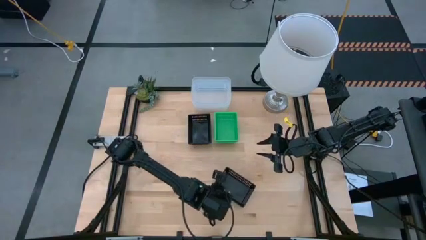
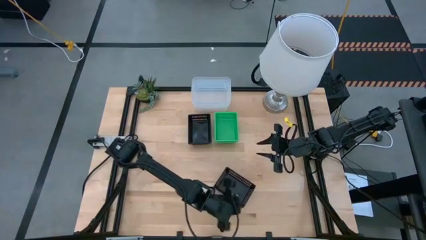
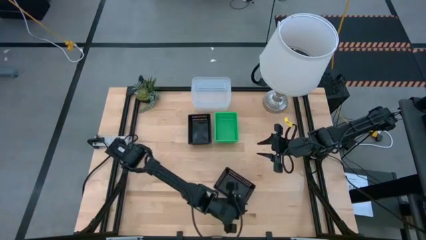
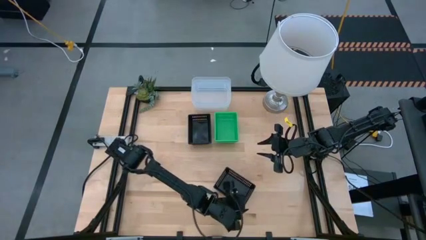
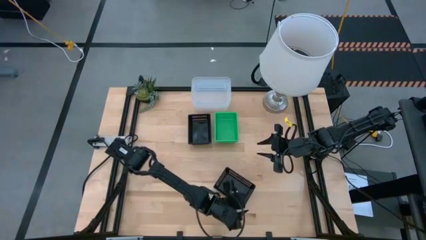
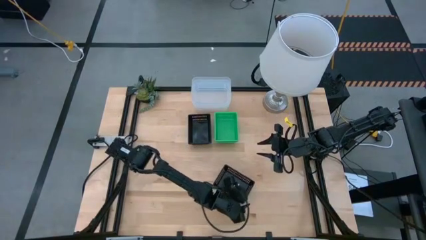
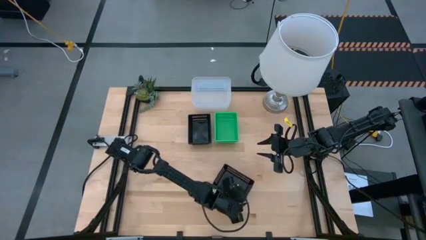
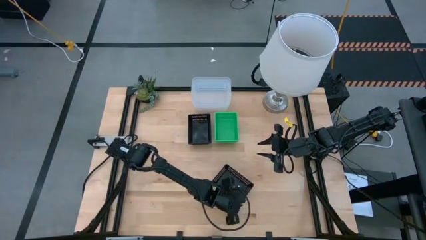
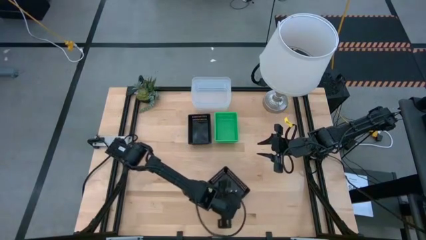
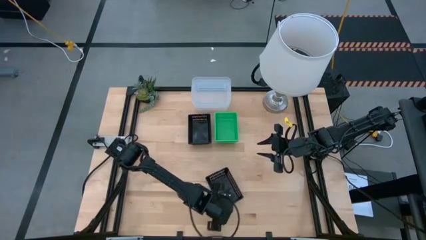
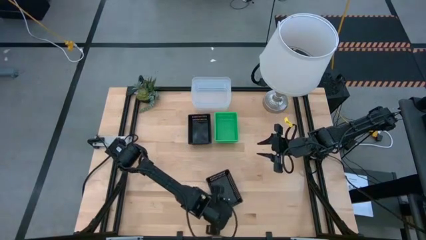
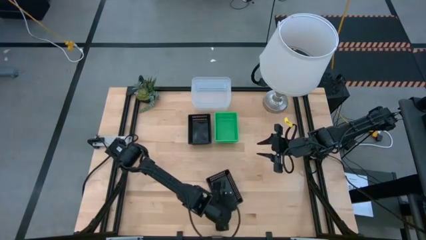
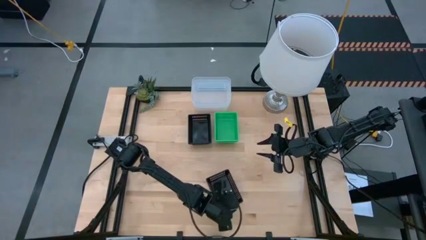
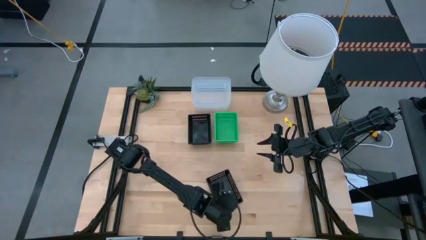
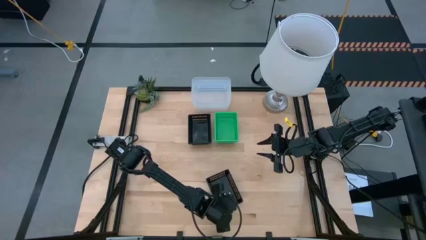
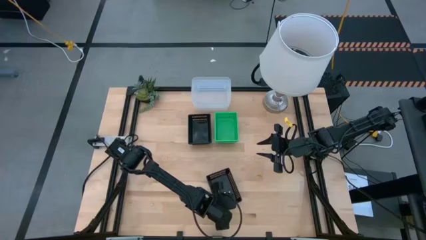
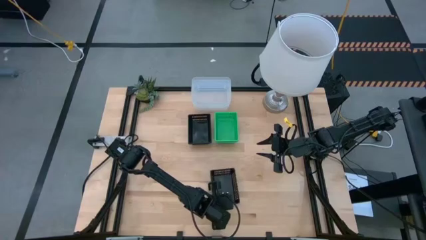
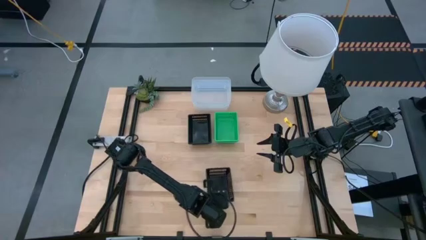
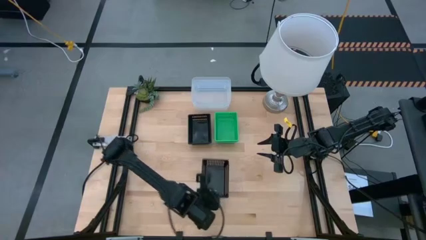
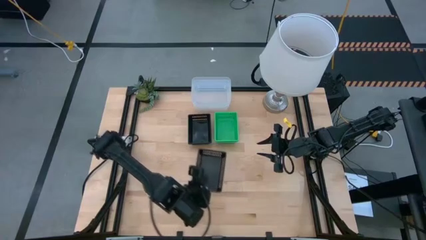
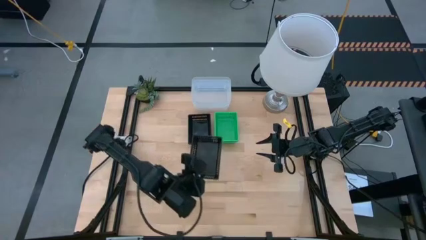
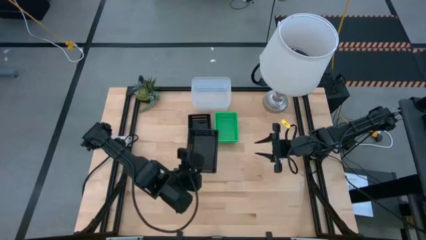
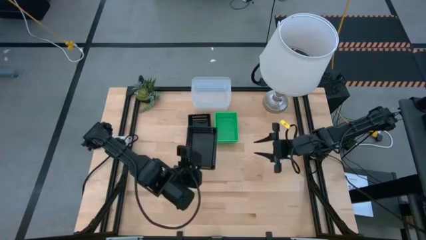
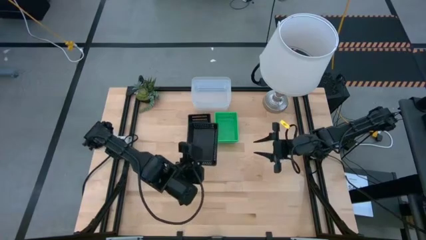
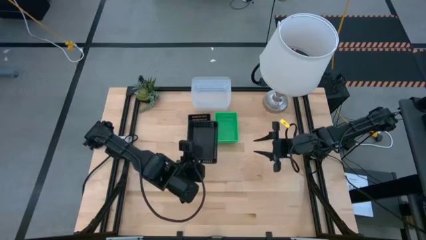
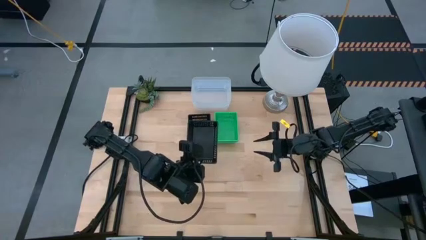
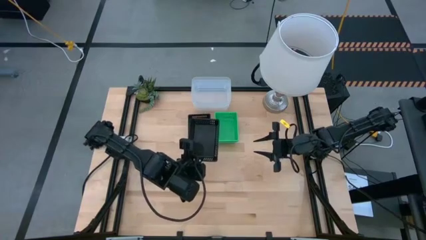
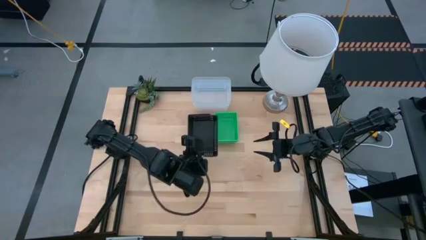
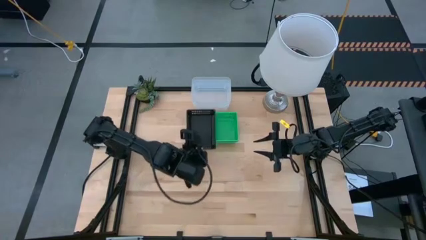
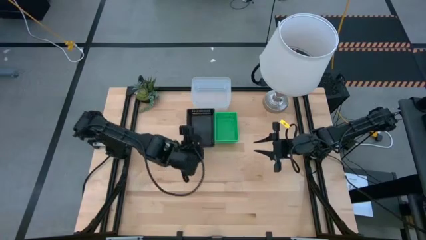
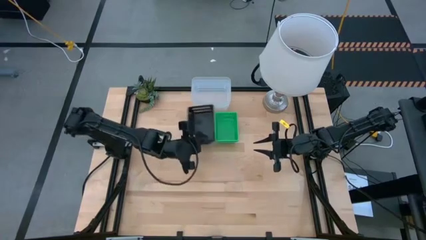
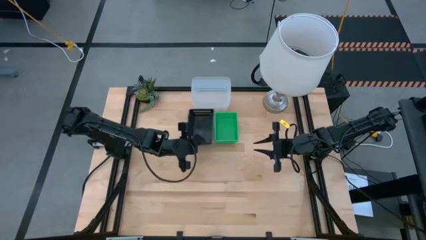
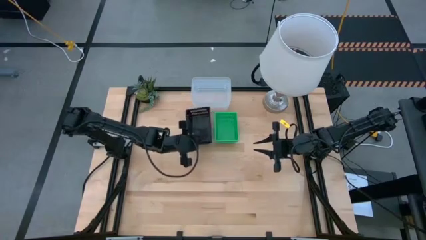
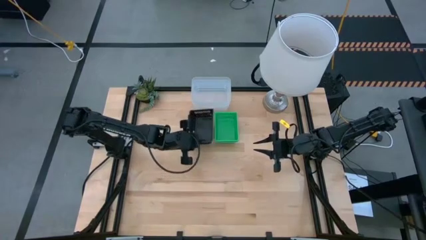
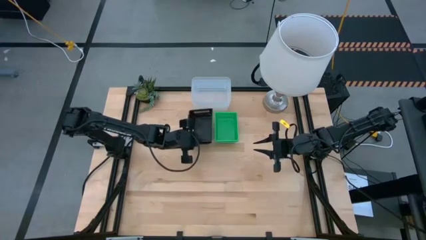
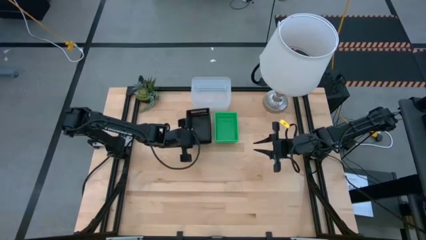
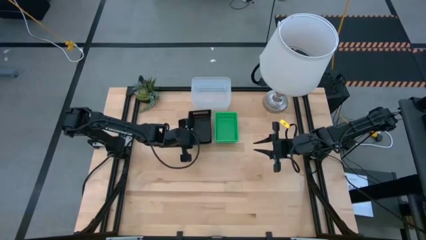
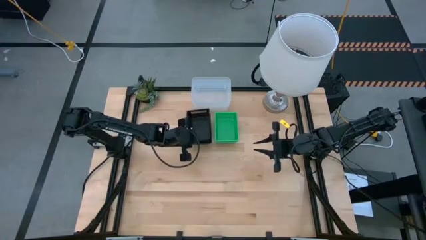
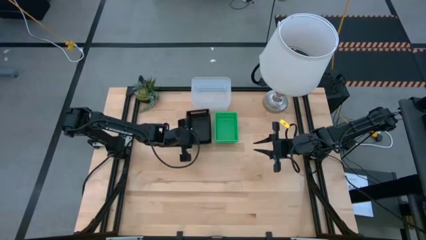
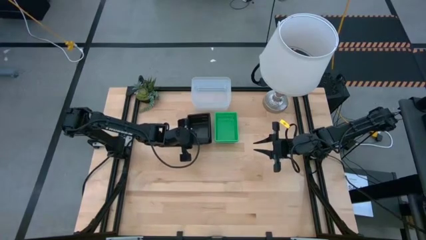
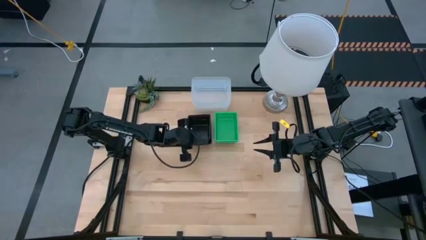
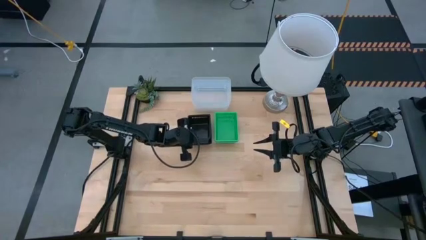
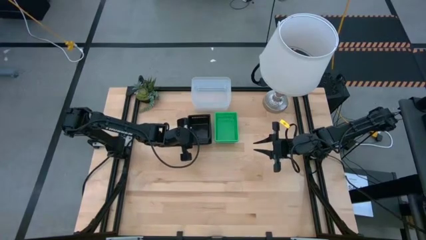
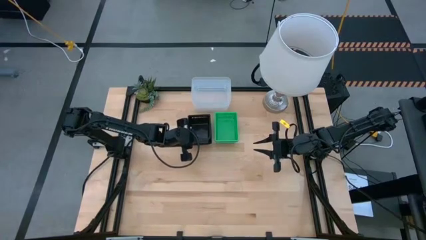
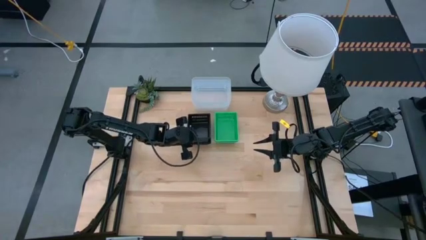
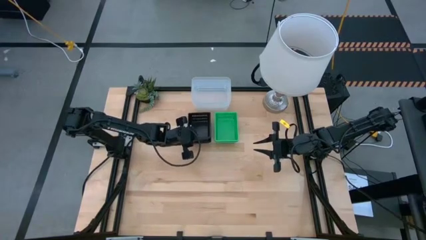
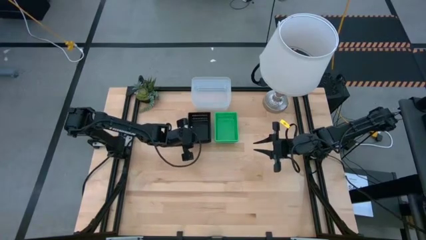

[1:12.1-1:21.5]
Stack the bottom black bin on the top stacked black bin
